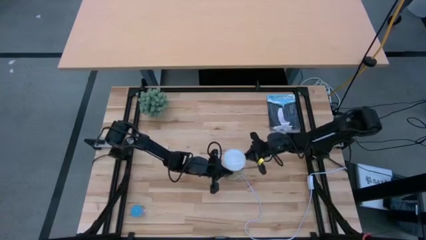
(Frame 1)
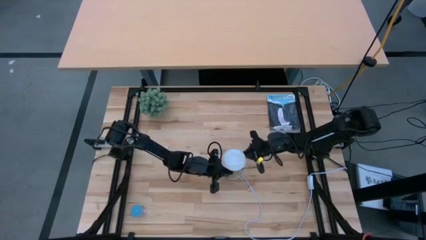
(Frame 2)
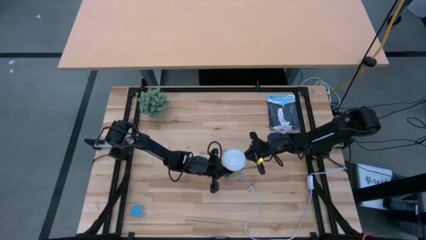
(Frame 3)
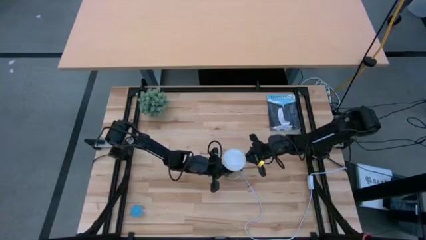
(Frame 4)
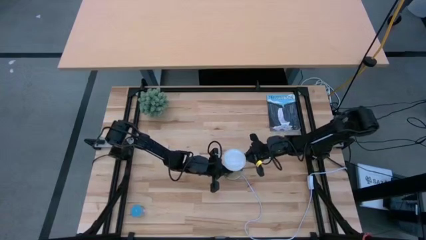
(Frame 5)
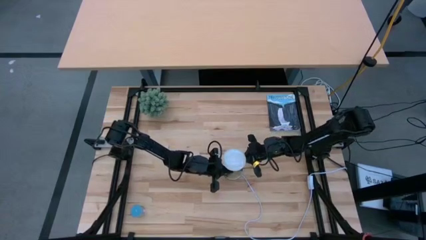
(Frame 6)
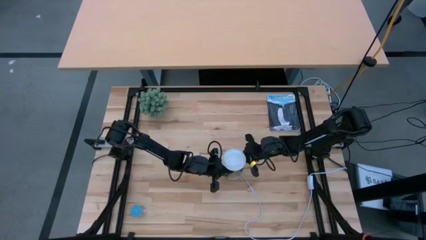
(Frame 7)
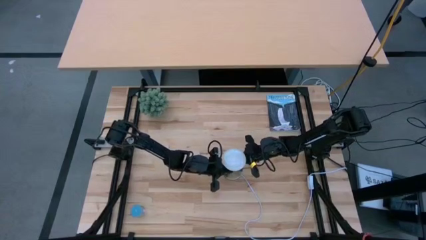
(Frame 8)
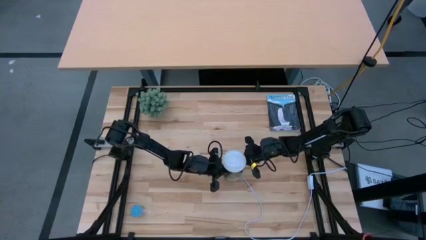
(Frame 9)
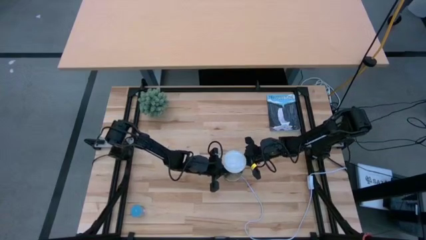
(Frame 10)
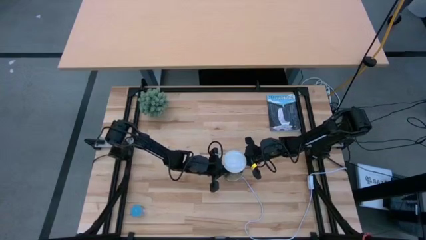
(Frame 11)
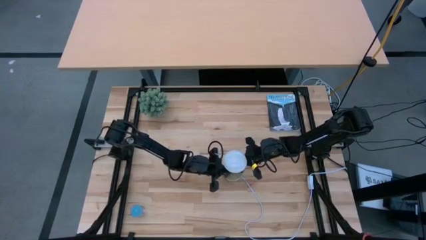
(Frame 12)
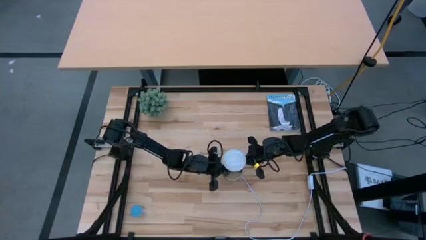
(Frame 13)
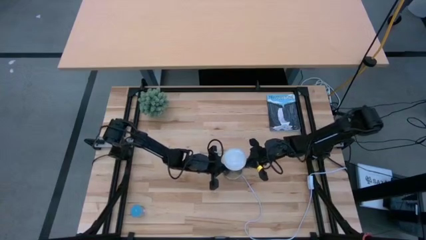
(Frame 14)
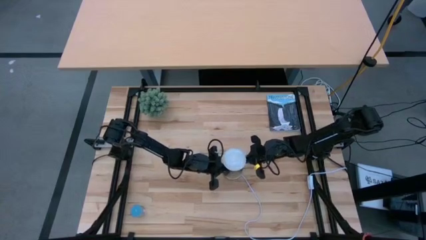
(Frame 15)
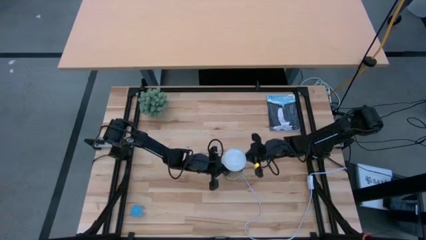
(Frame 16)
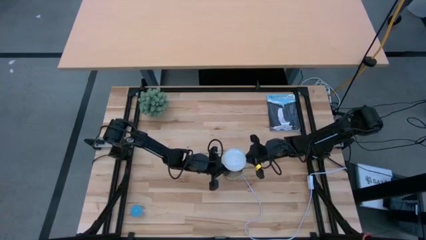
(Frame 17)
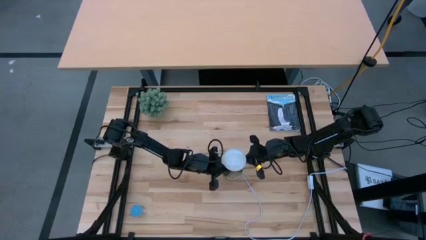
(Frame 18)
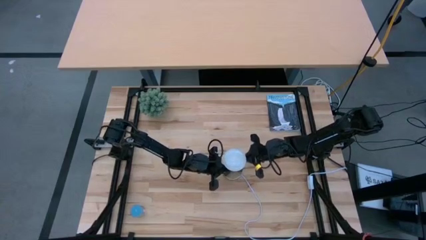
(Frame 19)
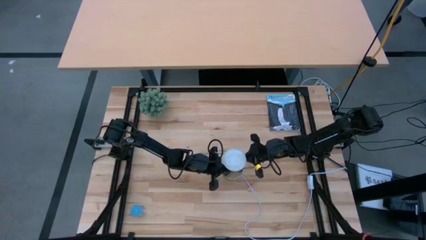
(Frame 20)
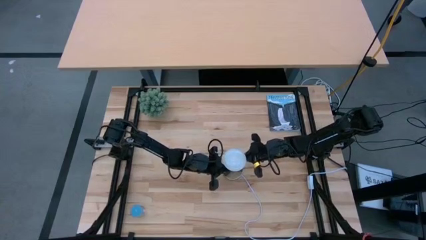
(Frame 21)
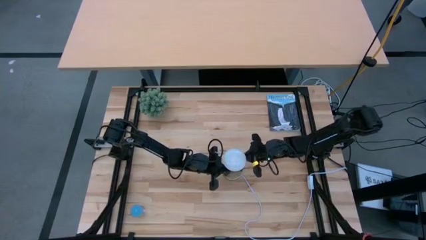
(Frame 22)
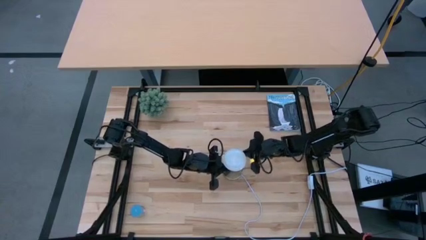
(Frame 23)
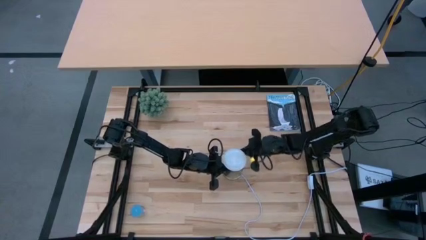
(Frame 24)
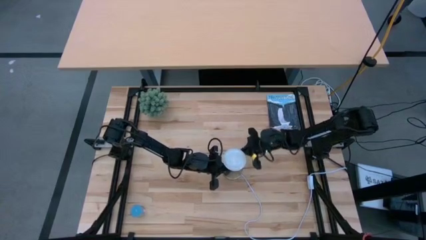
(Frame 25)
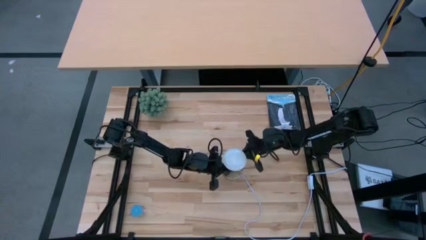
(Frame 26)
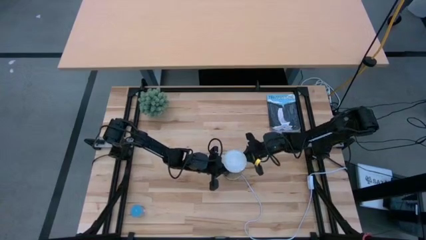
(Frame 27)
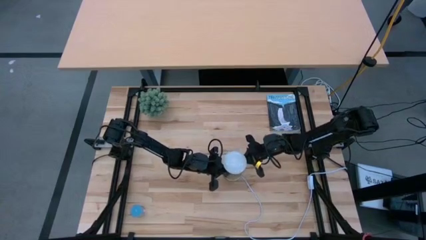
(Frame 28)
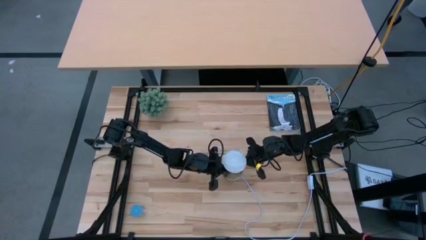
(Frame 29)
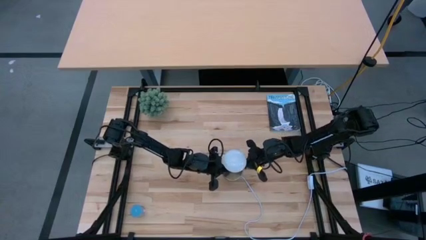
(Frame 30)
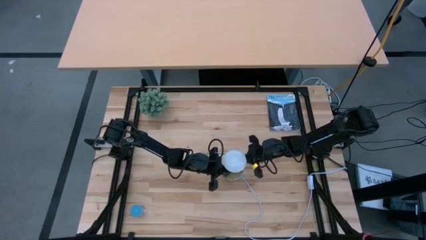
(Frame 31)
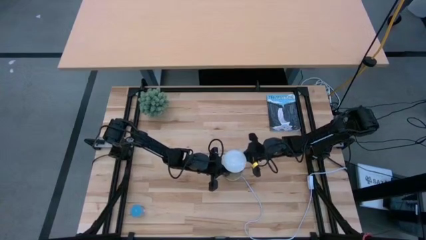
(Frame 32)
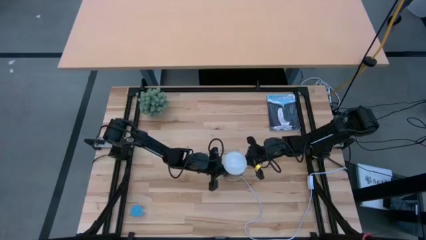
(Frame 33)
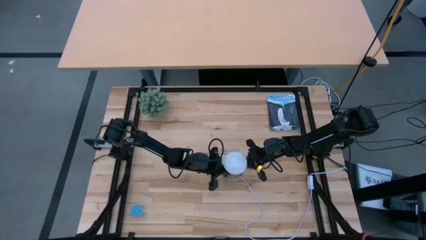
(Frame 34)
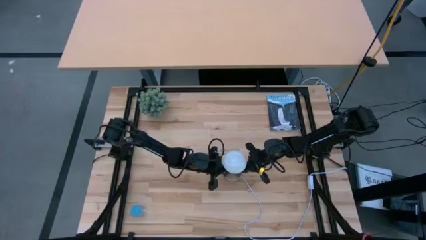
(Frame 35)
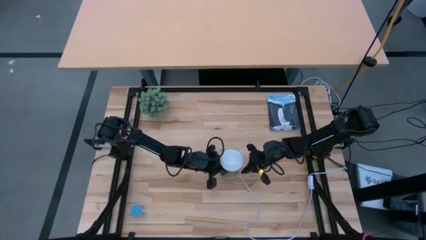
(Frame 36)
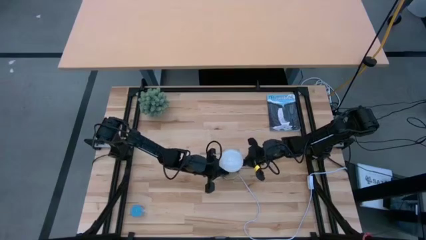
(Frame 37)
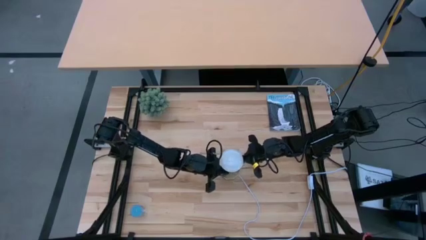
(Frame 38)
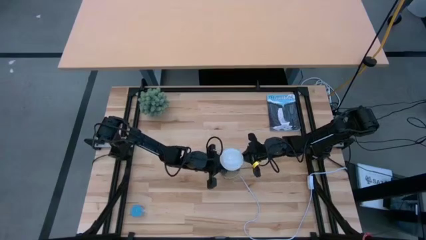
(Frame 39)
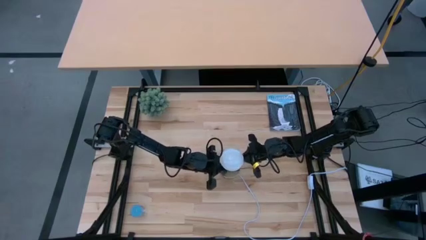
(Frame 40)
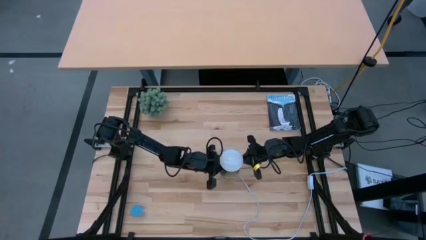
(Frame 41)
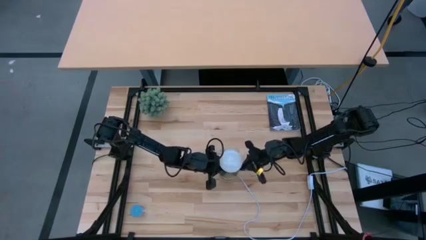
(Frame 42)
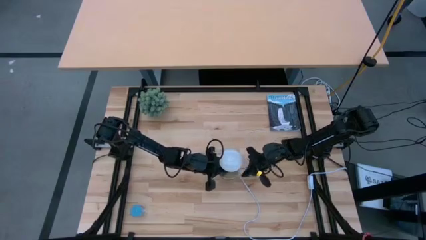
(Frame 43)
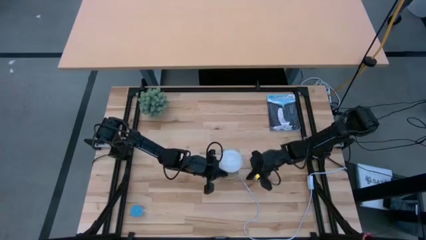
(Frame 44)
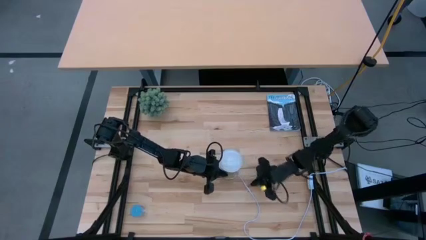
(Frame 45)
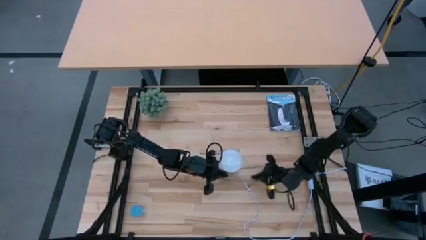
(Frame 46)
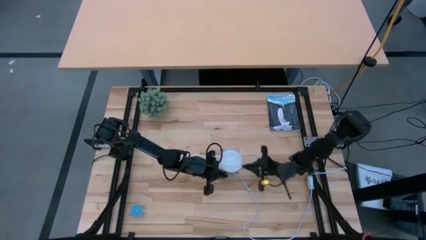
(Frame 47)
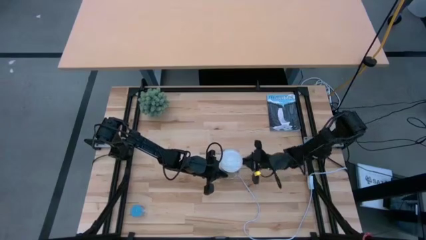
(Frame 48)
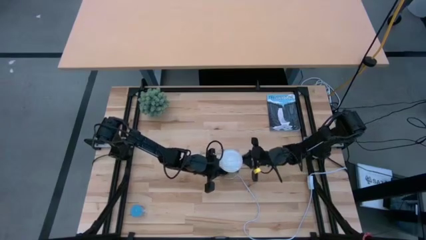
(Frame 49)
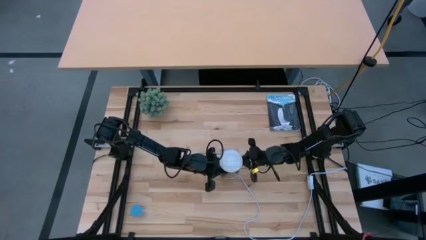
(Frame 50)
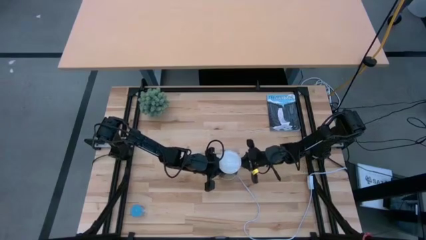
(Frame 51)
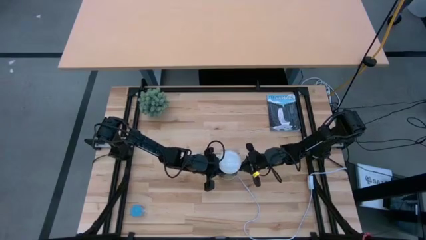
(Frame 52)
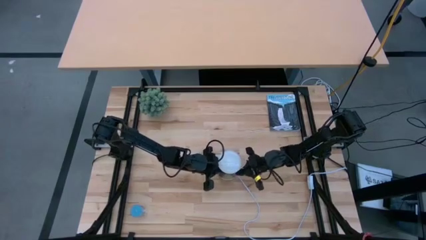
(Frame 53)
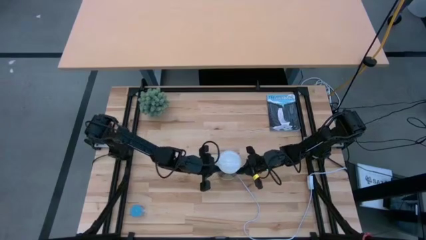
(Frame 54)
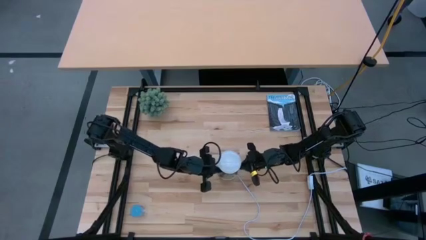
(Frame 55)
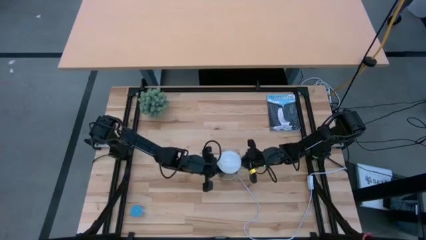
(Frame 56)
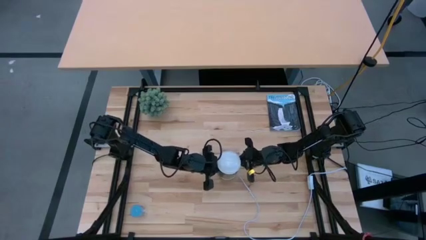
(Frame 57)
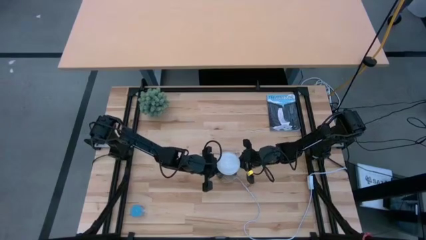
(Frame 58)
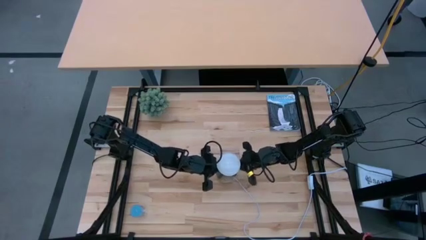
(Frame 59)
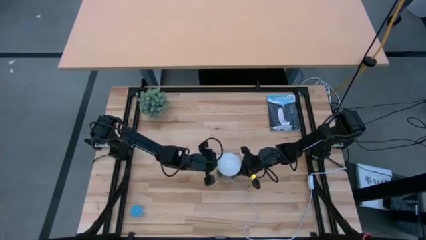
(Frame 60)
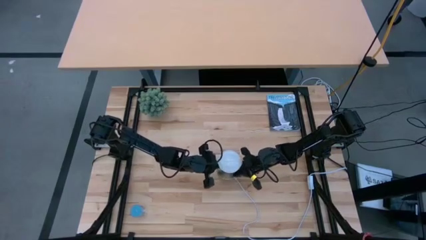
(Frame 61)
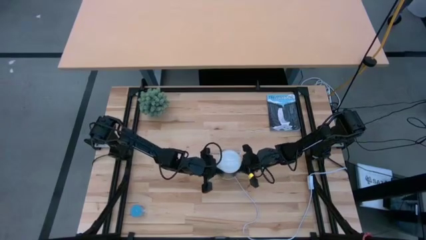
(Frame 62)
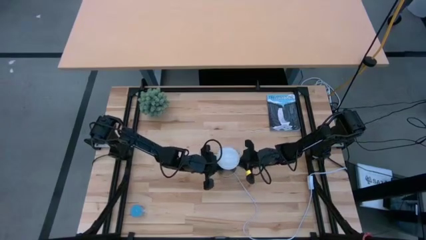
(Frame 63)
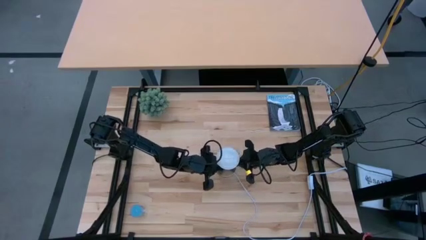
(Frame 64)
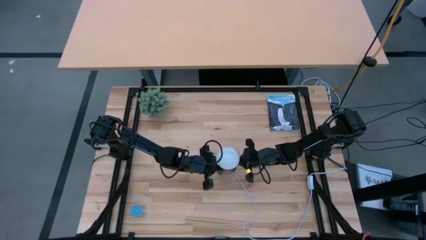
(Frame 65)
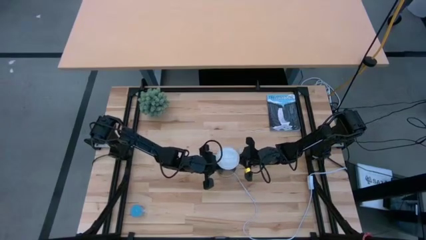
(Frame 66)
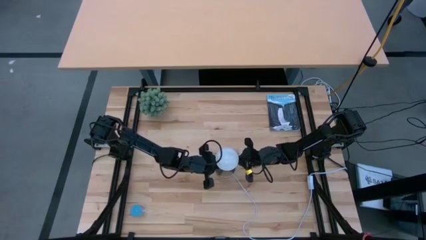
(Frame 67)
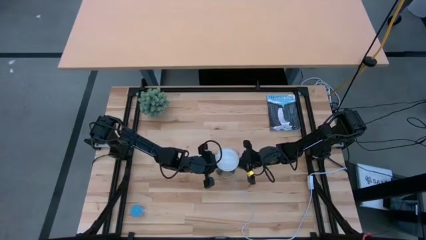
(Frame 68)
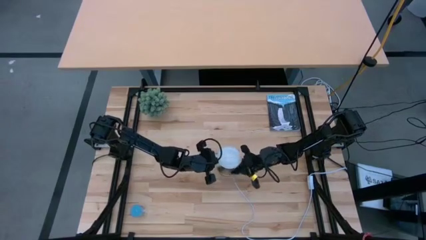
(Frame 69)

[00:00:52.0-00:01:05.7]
Task: Screw lightbulb
Insert the lightbulb into the lamp

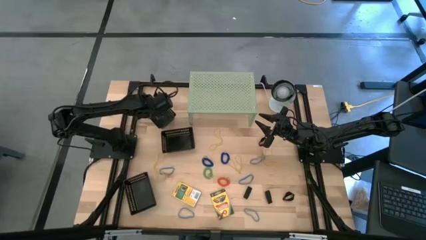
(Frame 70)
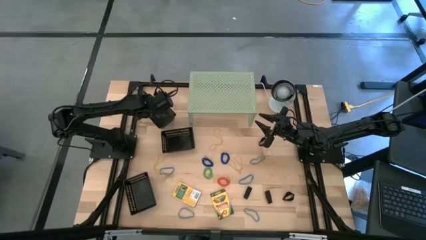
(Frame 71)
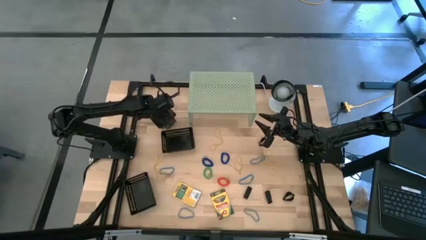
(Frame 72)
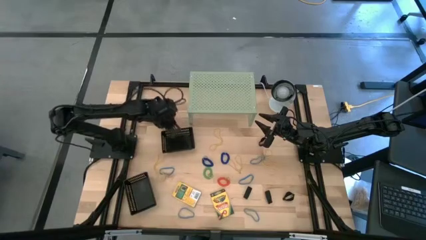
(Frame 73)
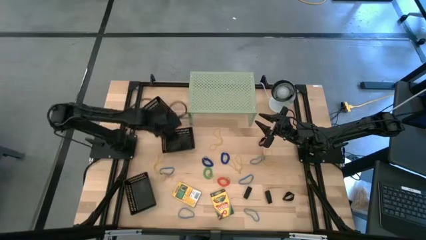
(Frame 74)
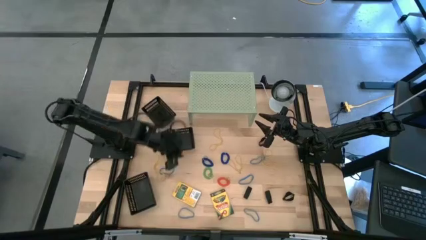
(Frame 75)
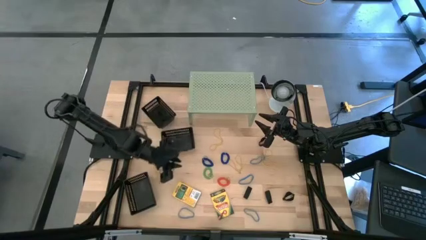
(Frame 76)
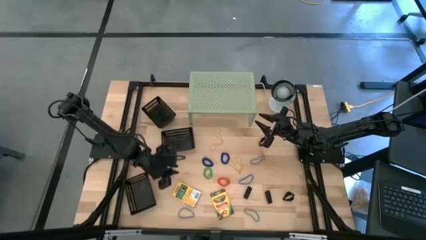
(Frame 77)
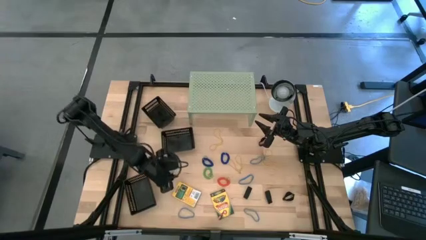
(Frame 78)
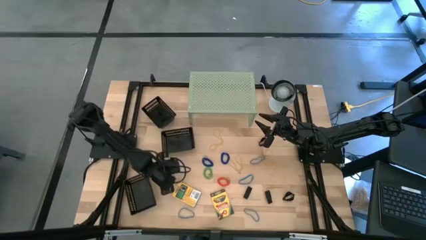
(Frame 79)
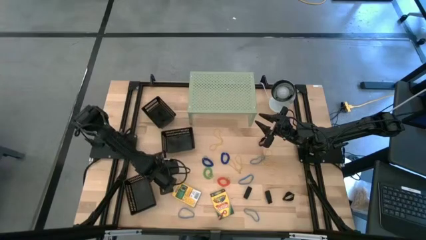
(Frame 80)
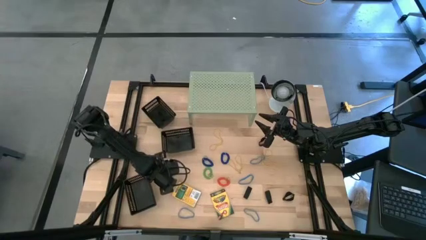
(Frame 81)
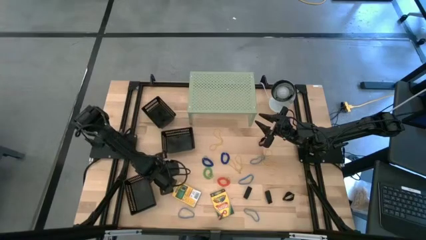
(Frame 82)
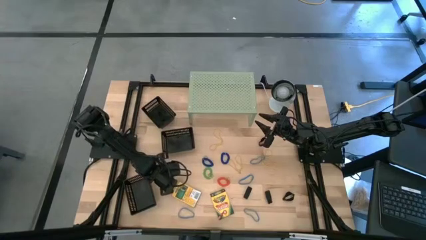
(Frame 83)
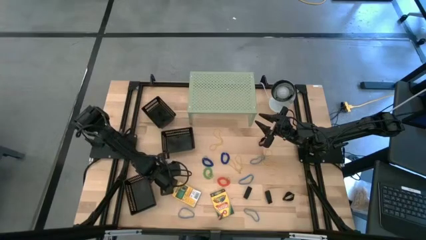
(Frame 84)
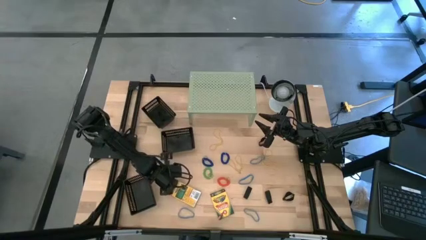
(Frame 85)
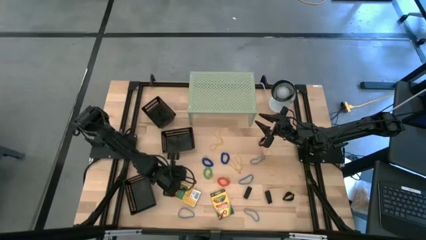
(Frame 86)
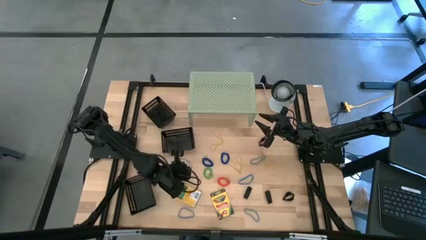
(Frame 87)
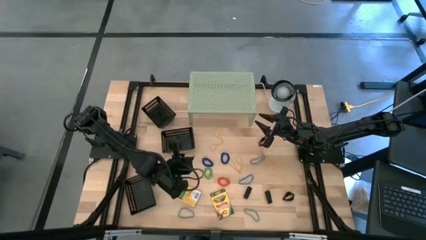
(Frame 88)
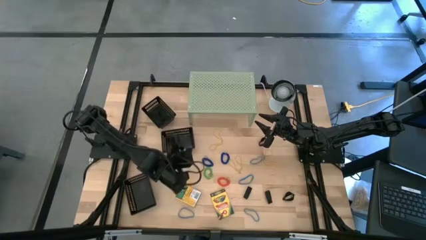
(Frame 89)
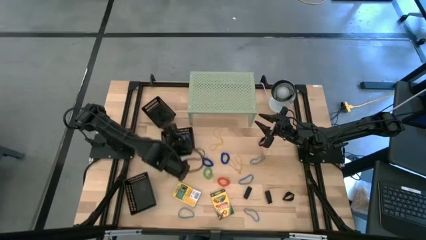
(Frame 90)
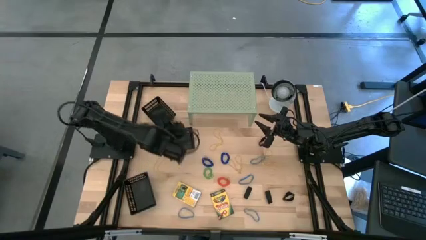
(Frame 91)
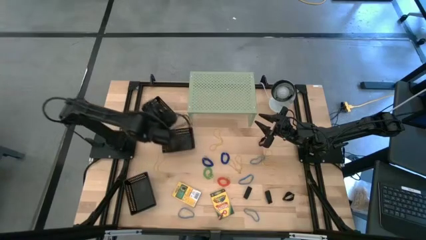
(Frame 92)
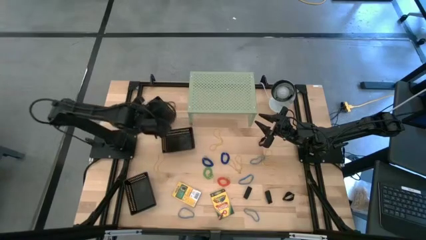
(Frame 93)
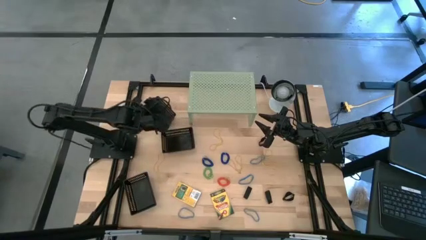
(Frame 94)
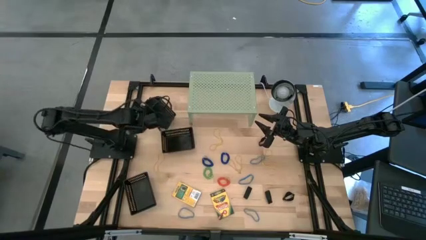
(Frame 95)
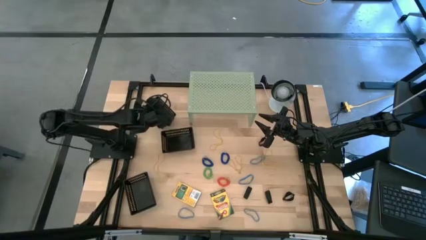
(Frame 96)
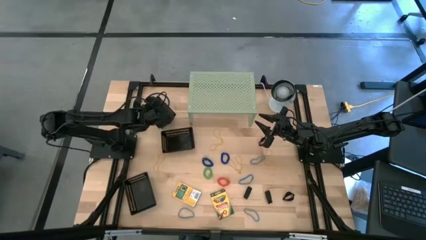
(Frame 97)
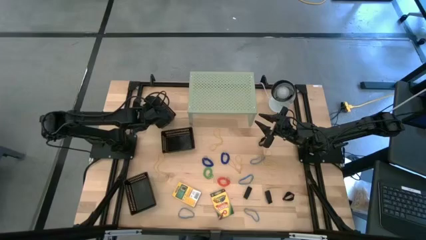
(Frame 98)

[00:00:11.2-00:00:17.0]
Task: Pick & Place Office Desk Supplies
Put the blue rubber band into the top black bin
